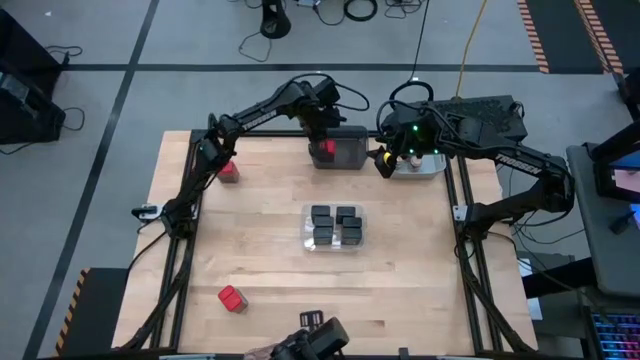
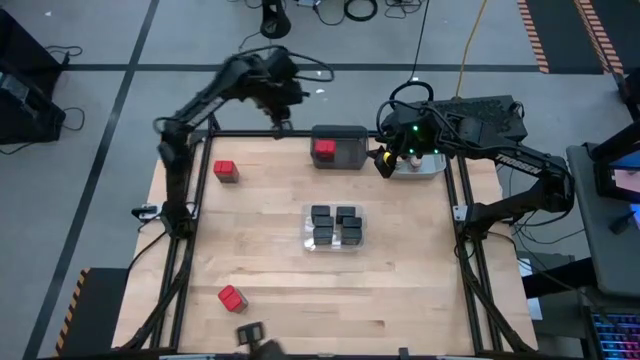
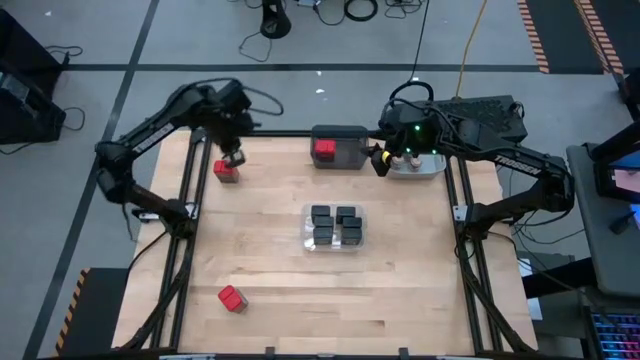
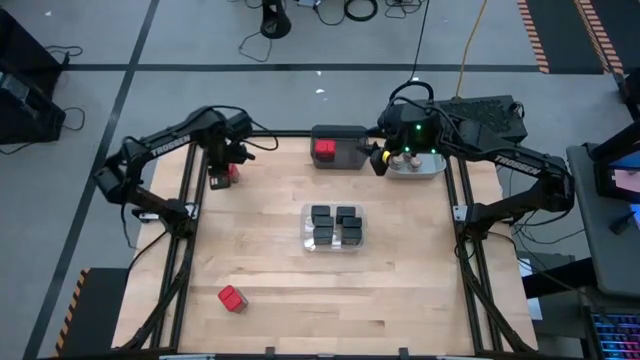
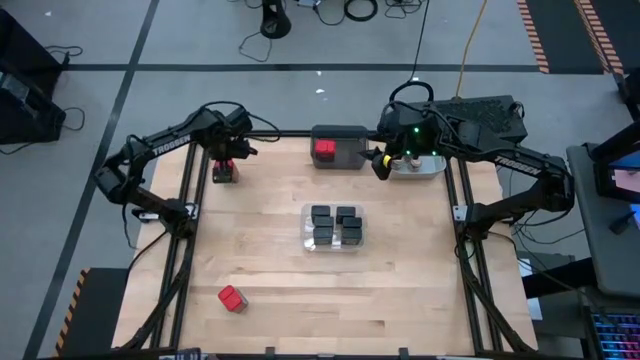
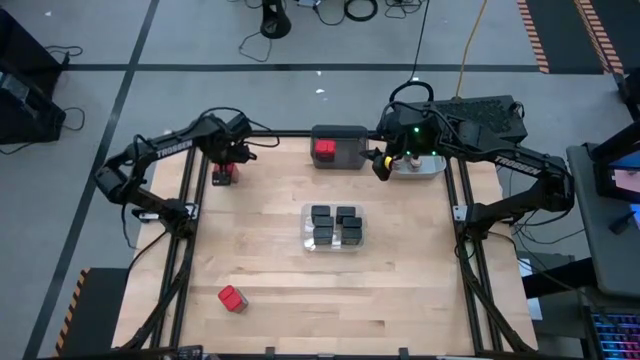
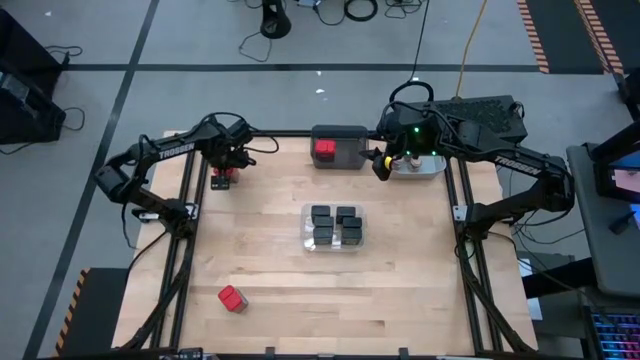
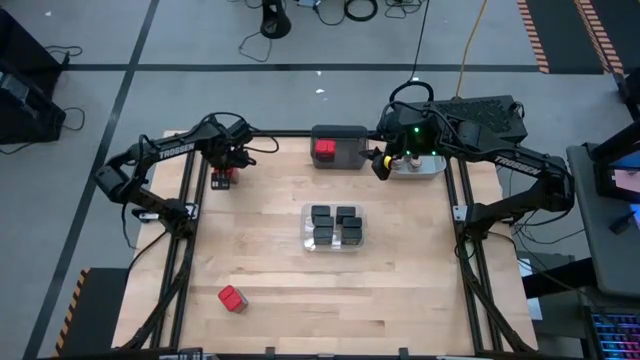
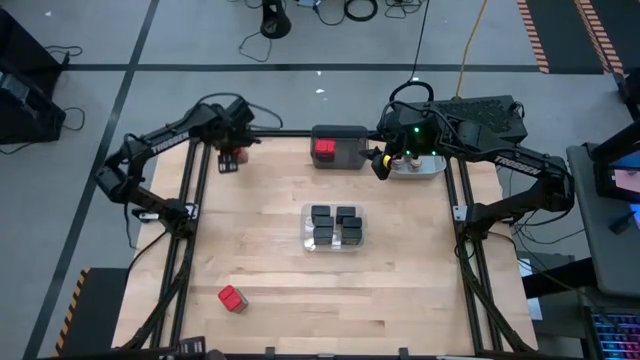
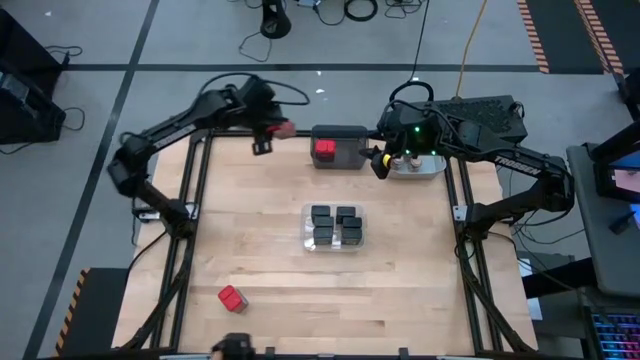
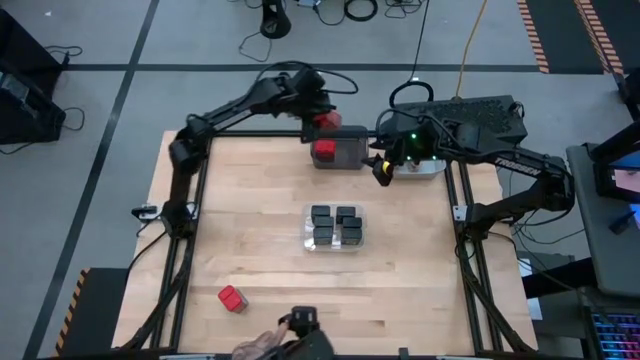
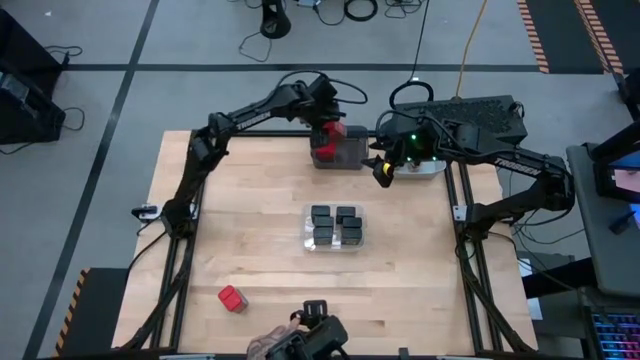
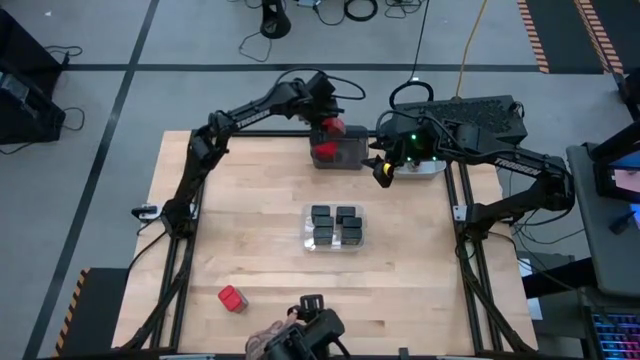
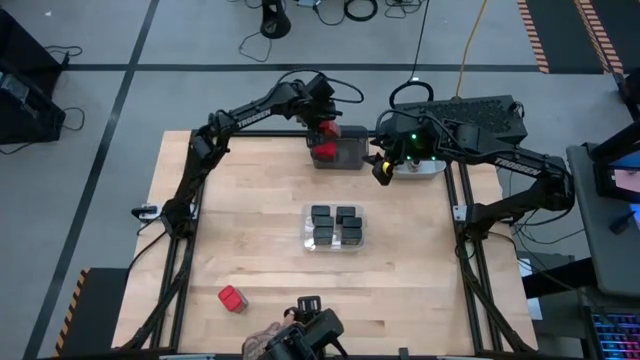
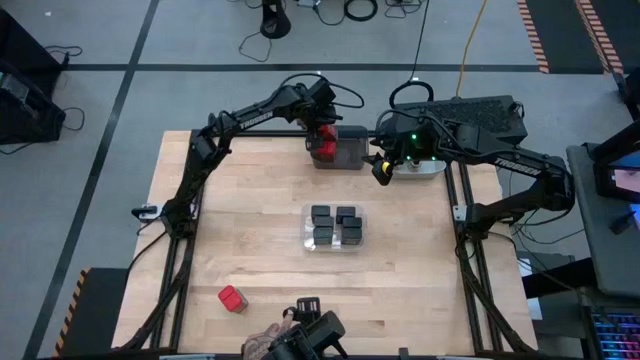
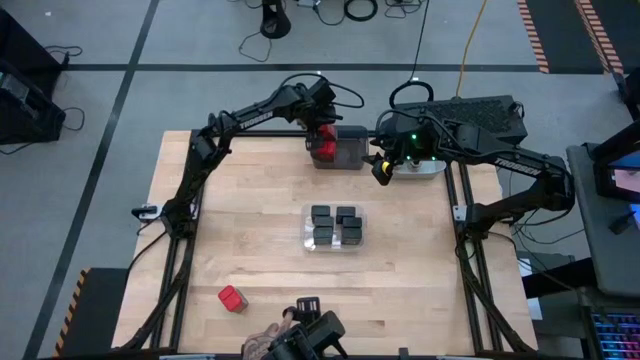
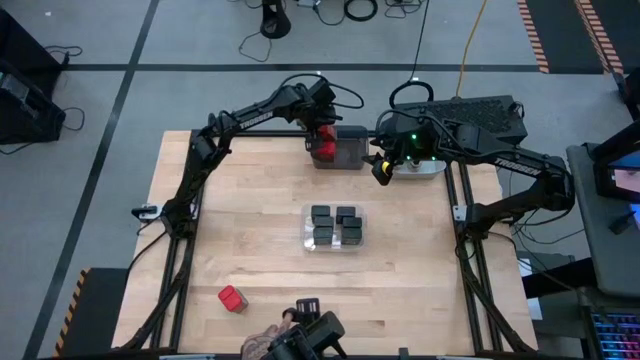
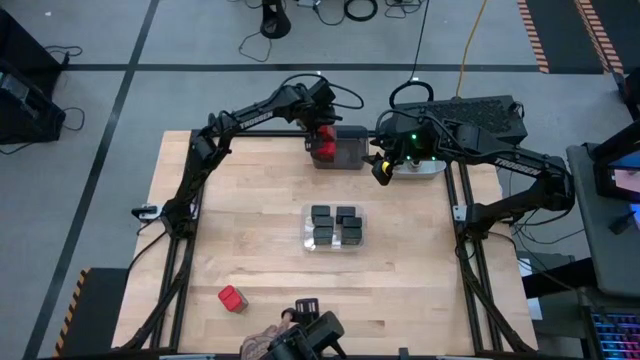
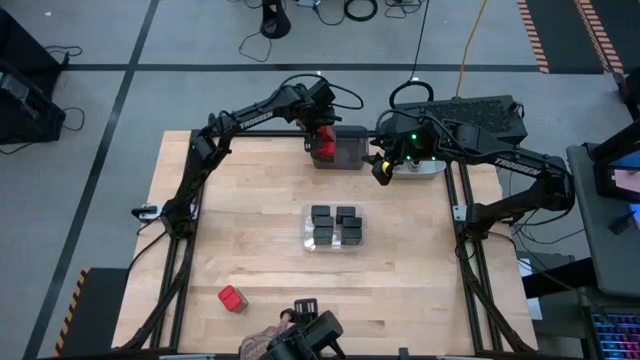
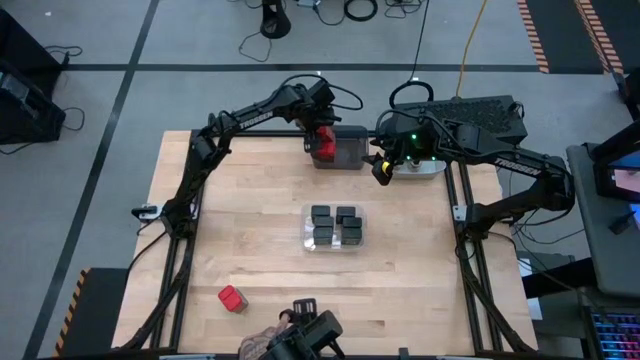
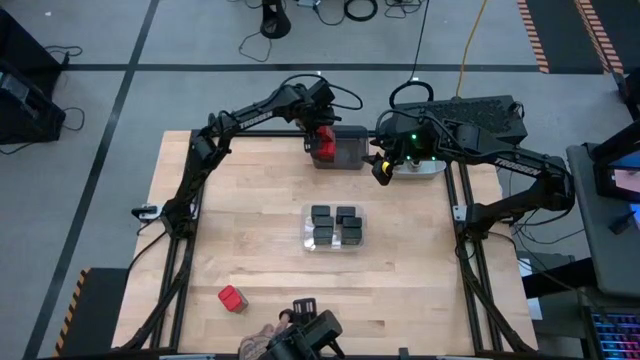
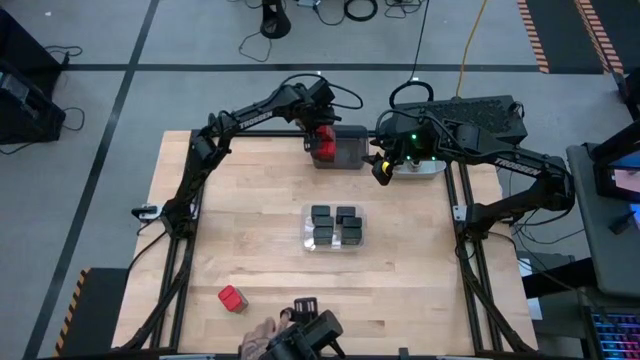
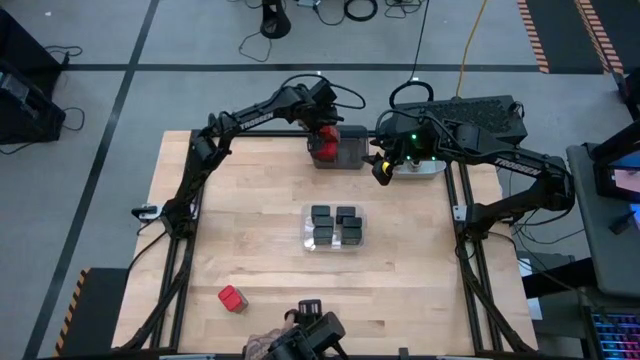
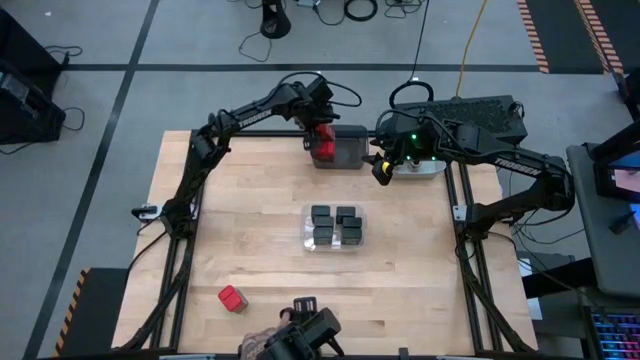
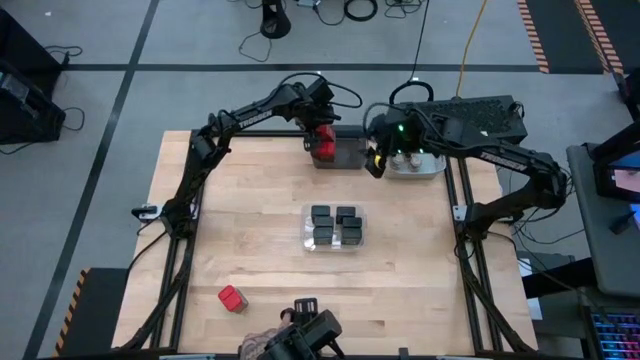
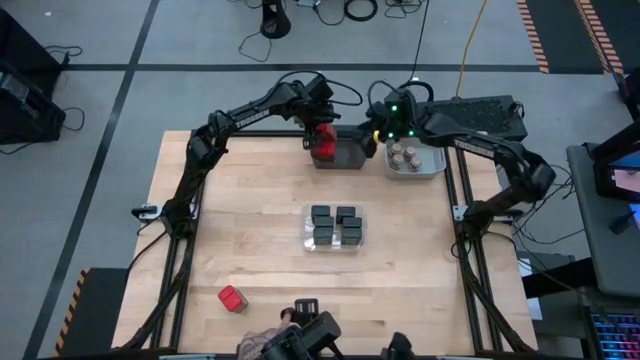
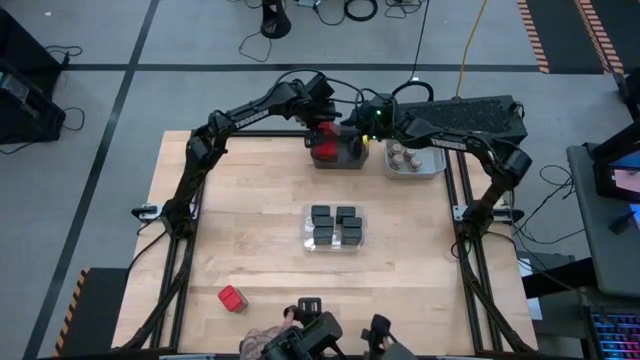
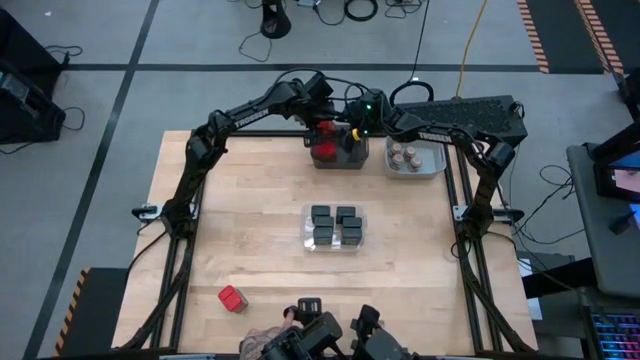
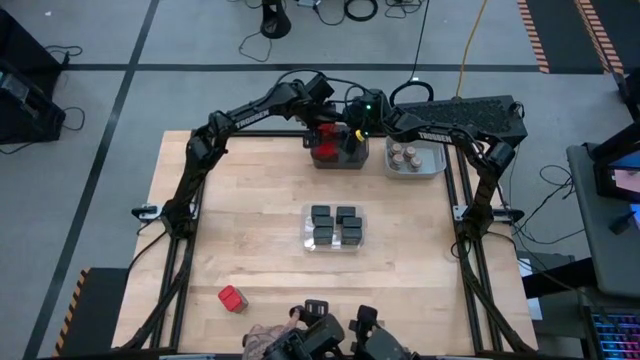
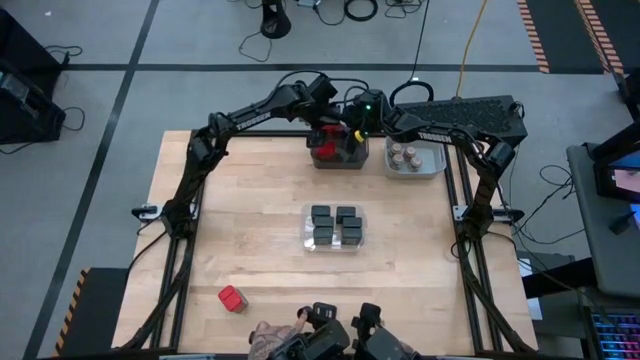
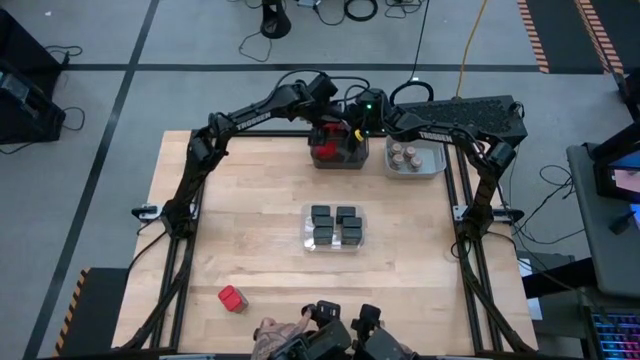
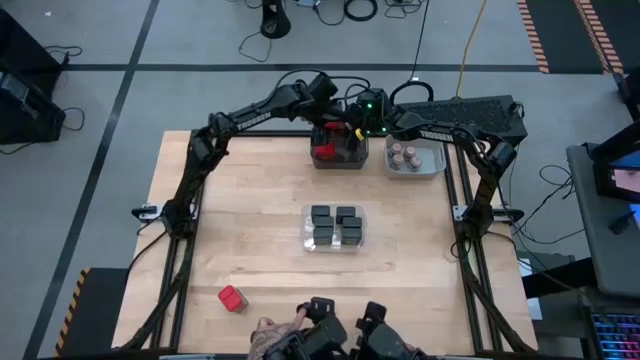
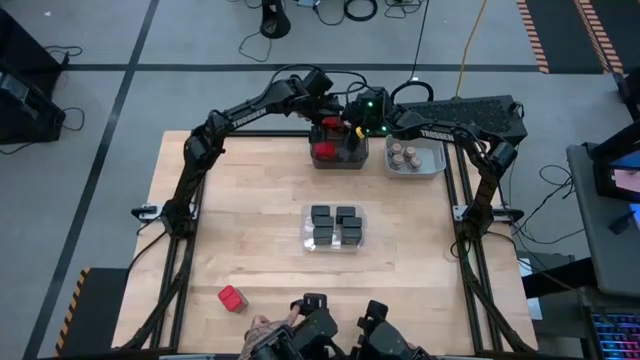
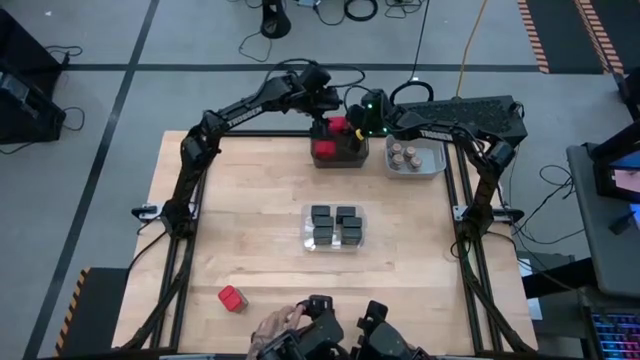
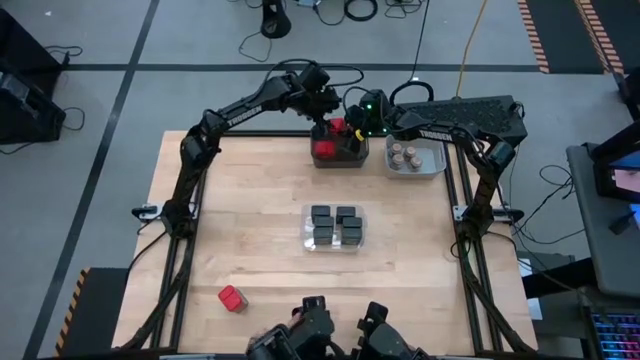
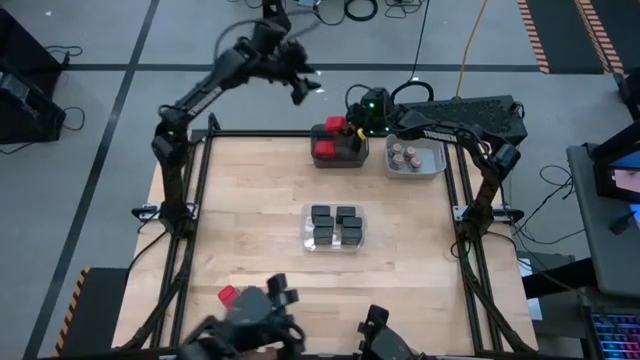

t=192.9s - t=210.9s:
Task: Sort spices by type
Put the red seasoning can into the black bin

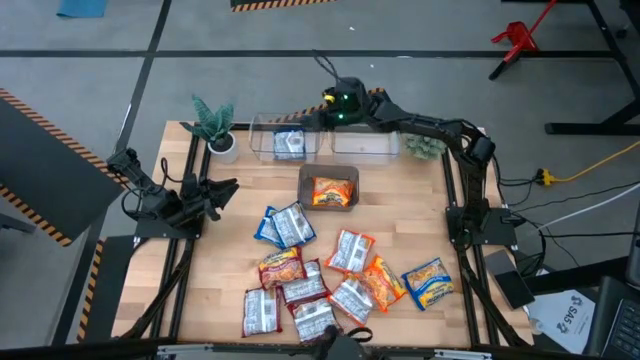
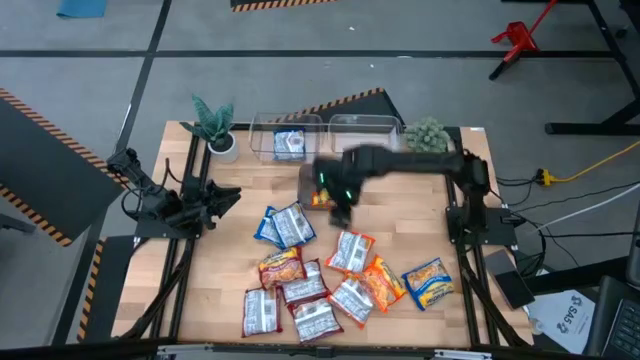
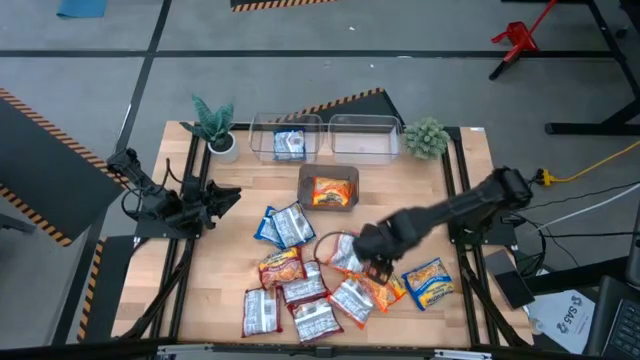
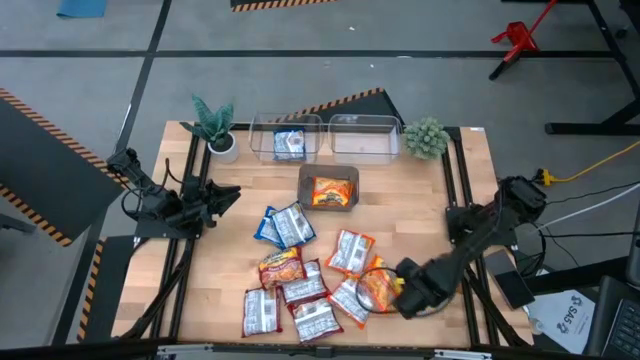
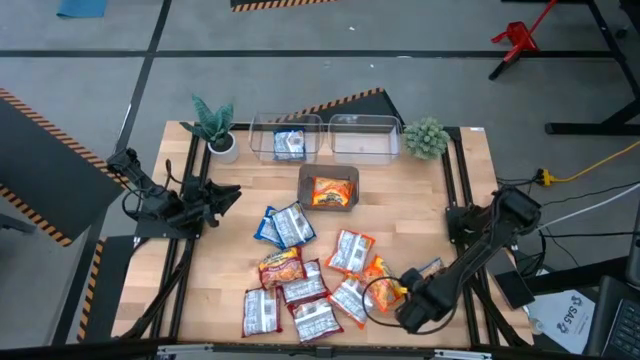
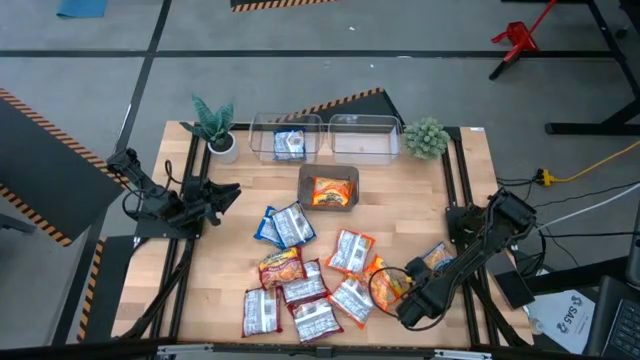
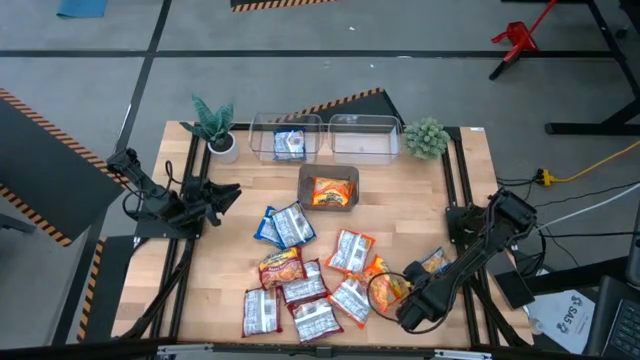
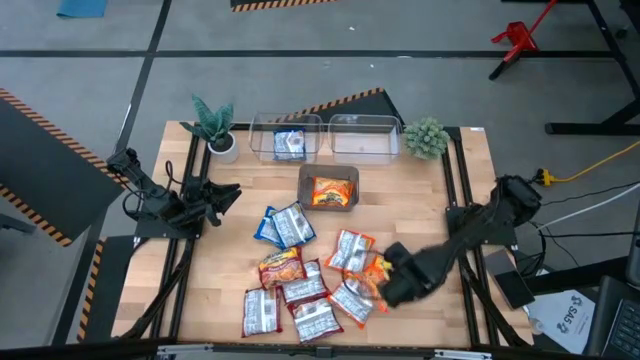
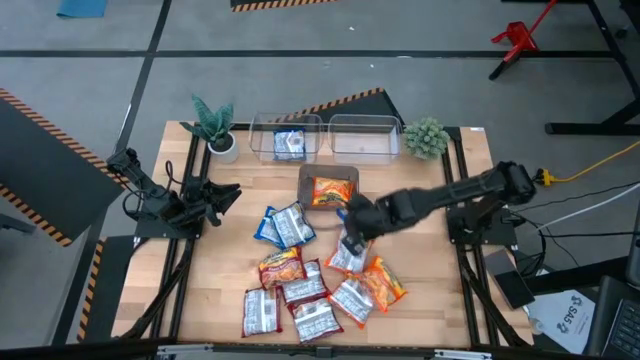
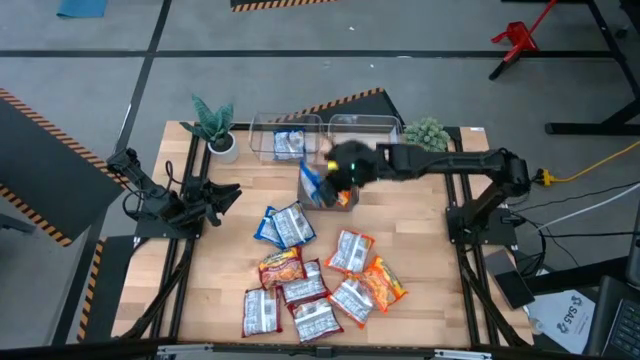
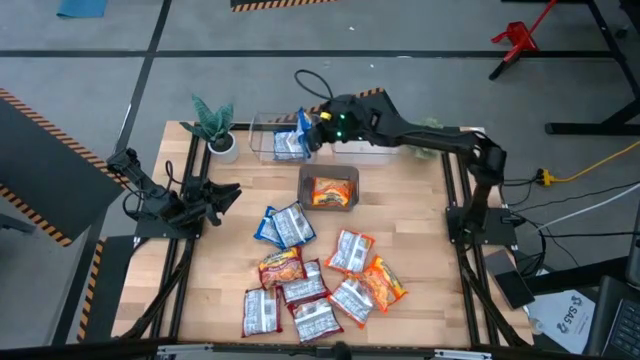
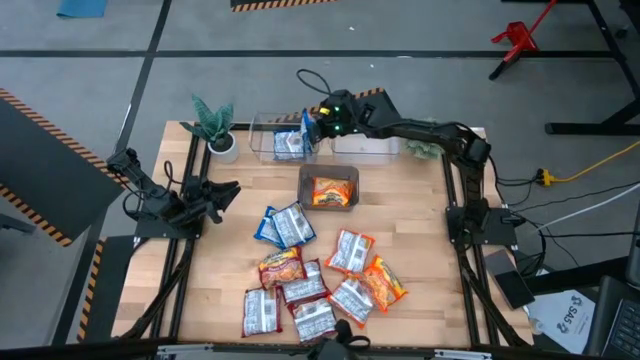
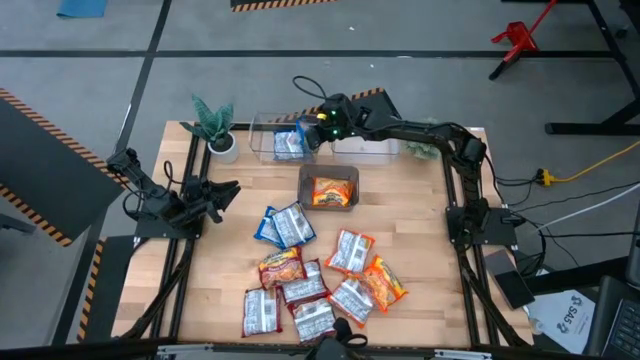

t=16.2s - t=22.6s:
Task: Sort Maruchan noodles
Put the blue noodle pack into the left transparent bin
